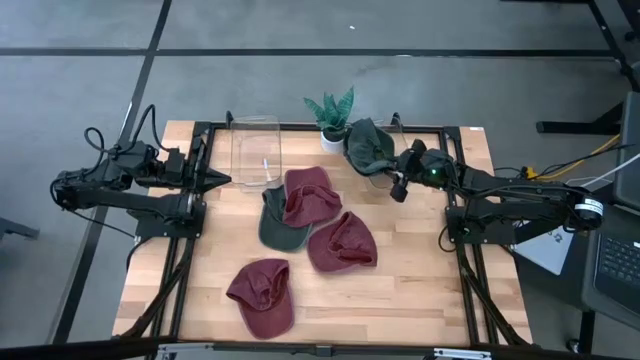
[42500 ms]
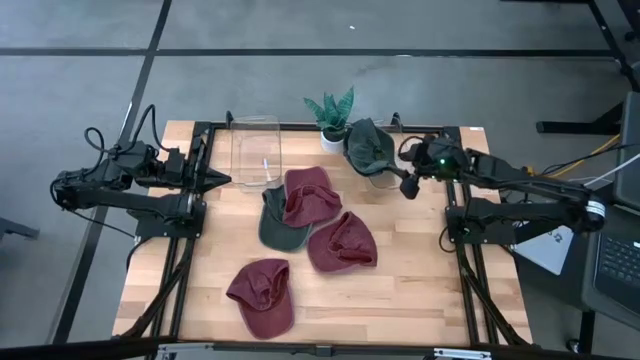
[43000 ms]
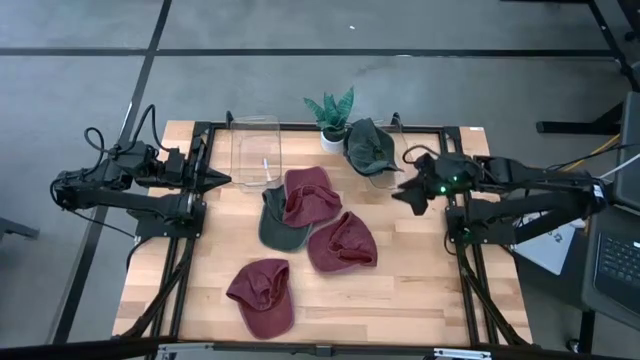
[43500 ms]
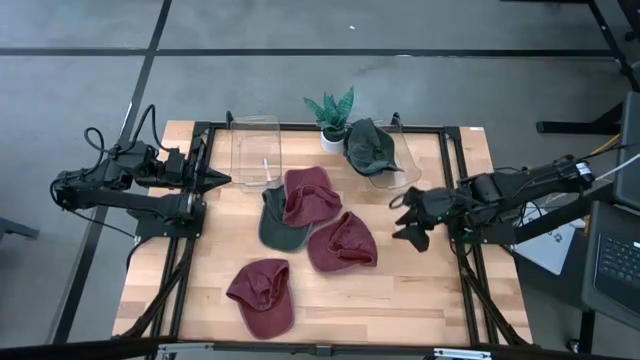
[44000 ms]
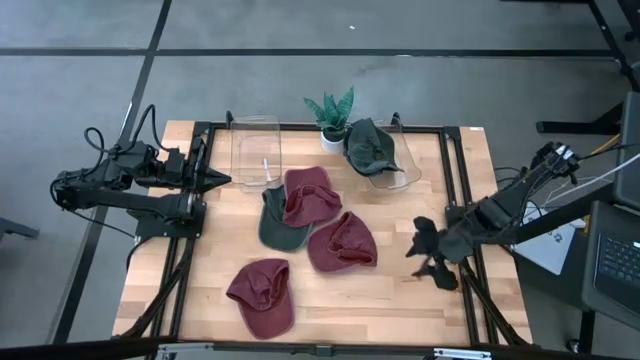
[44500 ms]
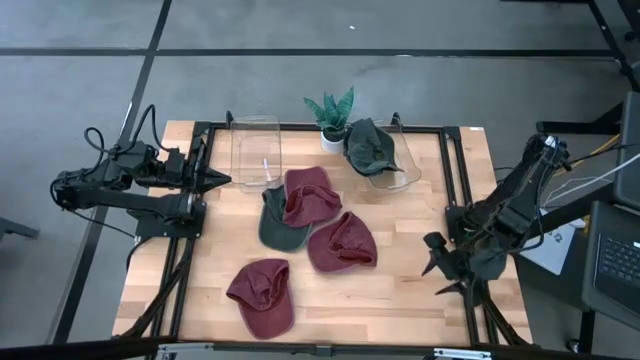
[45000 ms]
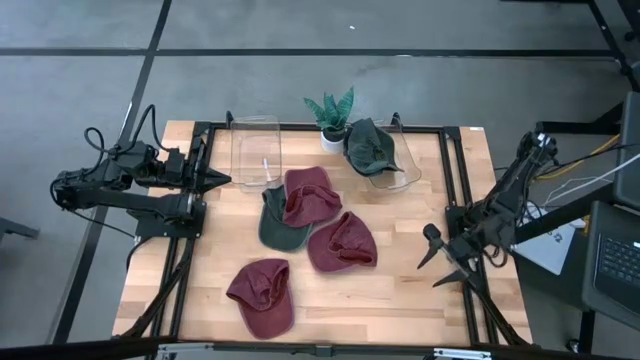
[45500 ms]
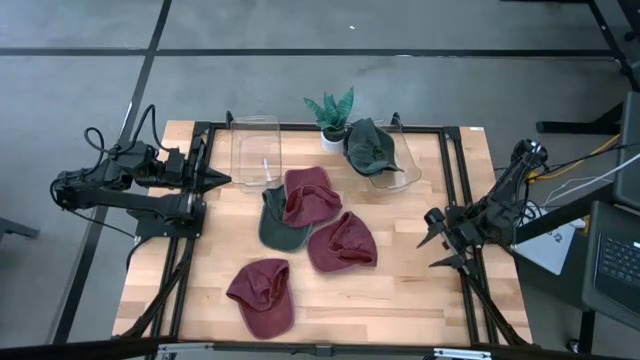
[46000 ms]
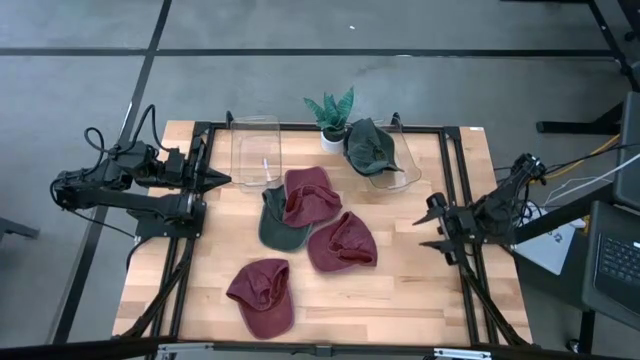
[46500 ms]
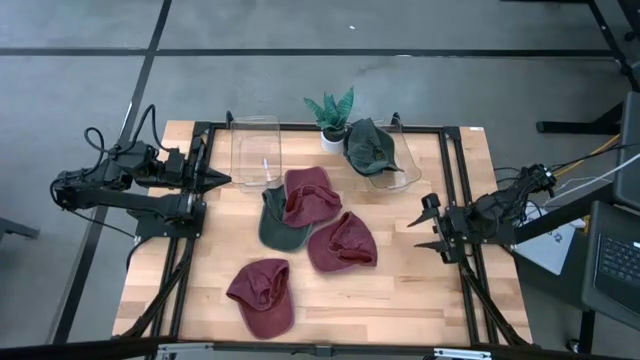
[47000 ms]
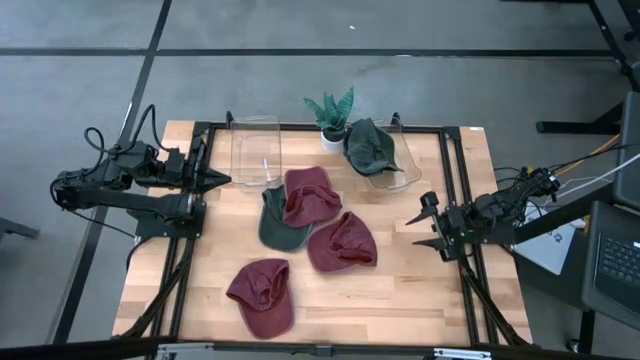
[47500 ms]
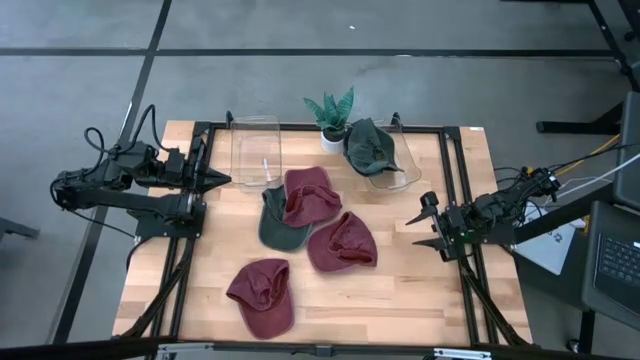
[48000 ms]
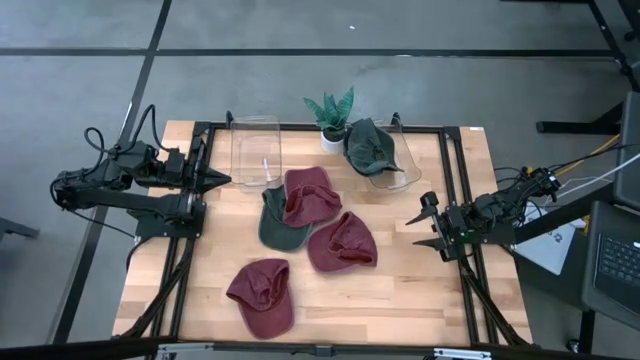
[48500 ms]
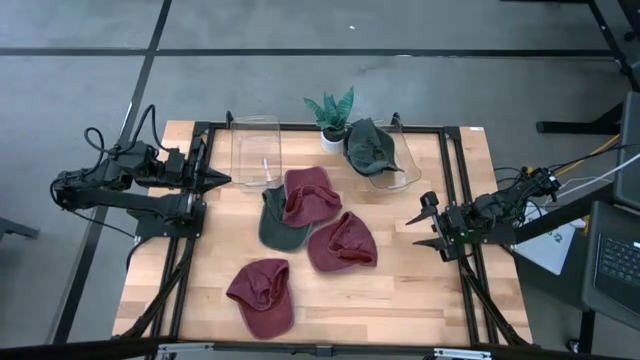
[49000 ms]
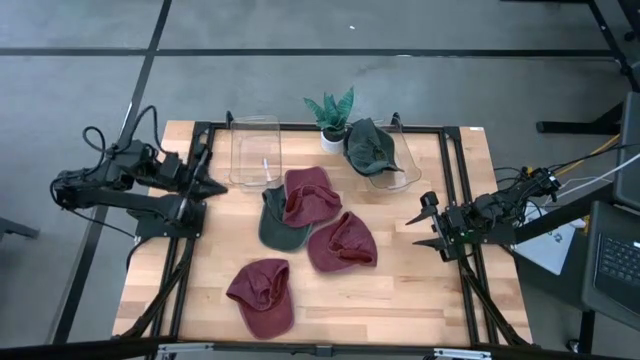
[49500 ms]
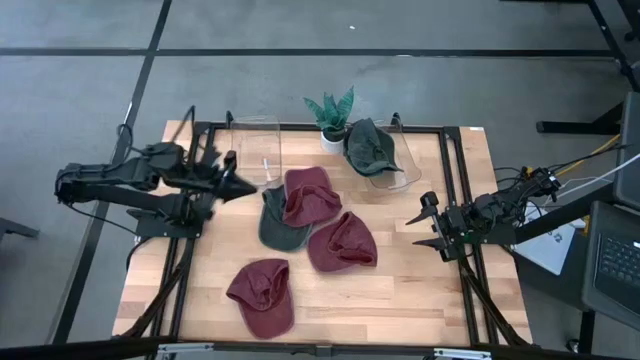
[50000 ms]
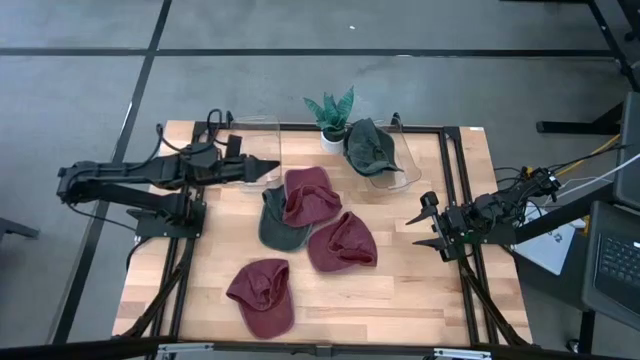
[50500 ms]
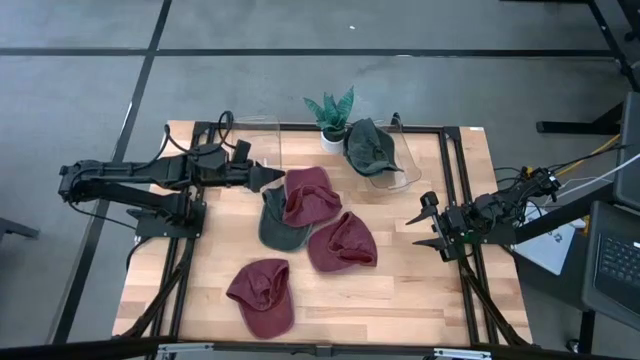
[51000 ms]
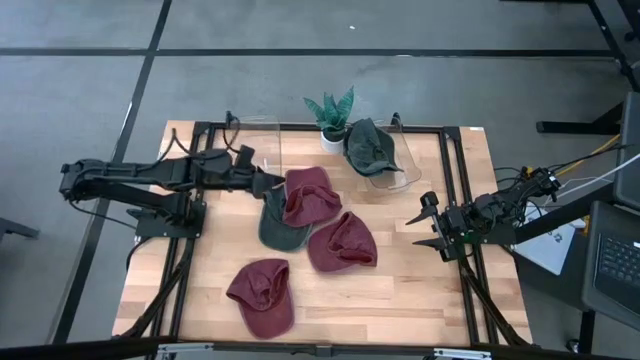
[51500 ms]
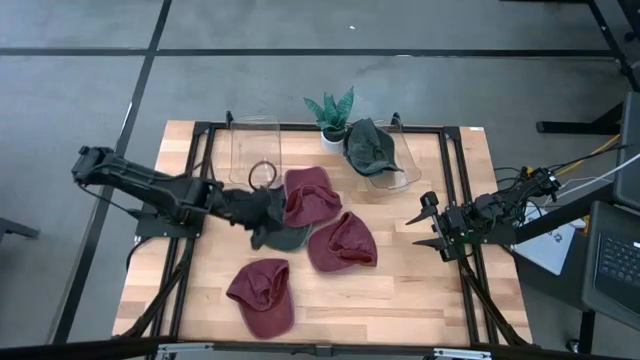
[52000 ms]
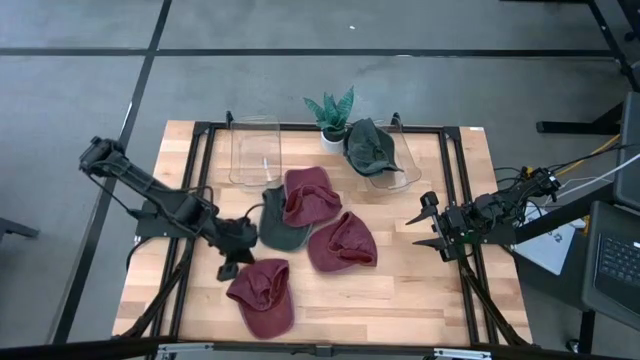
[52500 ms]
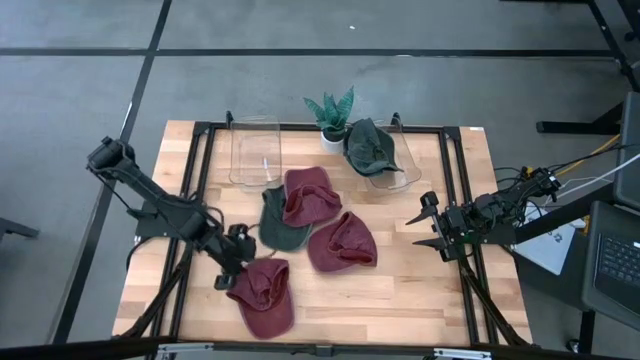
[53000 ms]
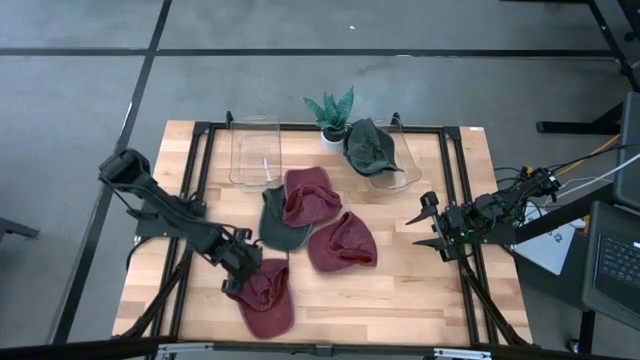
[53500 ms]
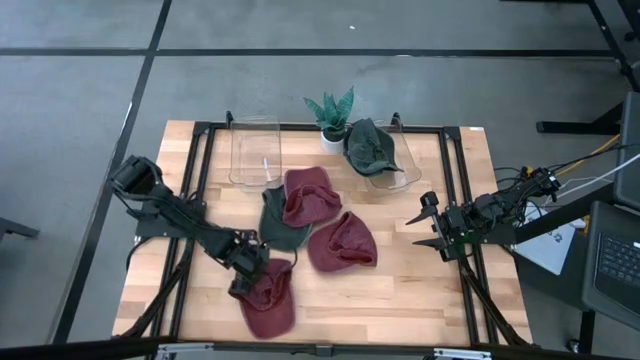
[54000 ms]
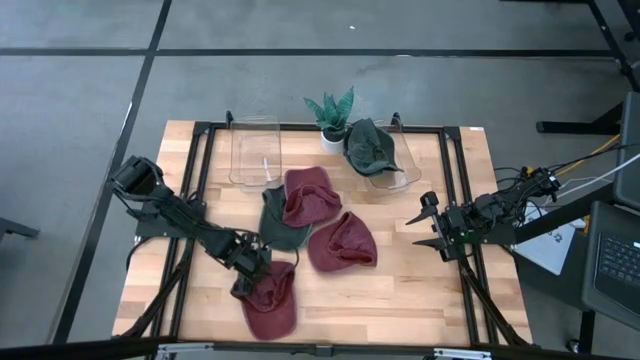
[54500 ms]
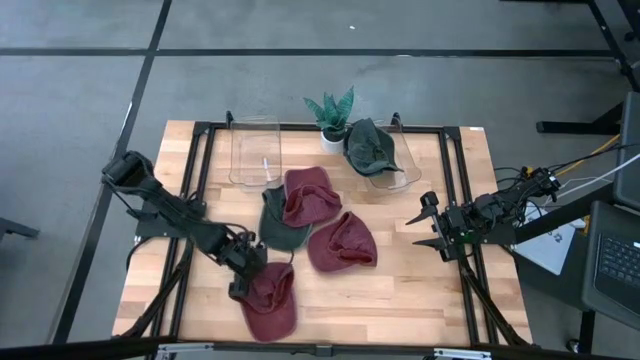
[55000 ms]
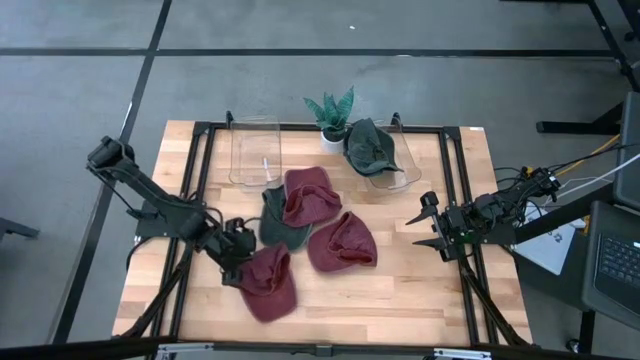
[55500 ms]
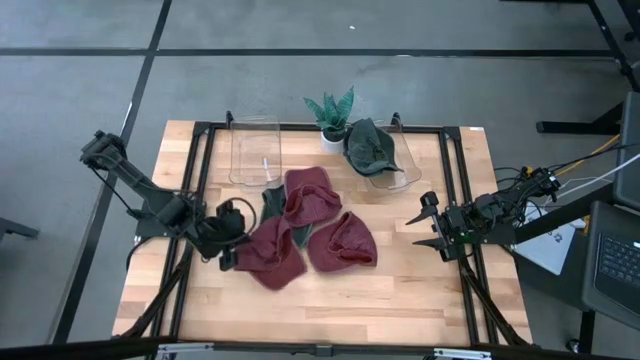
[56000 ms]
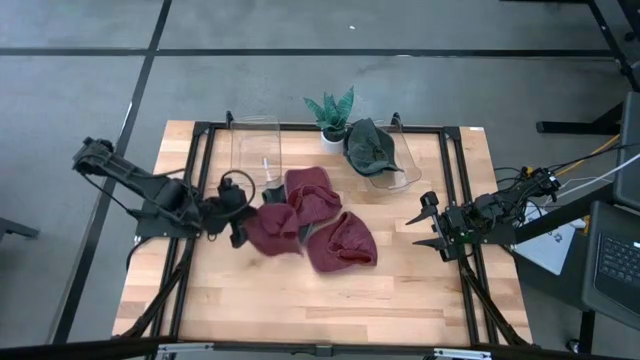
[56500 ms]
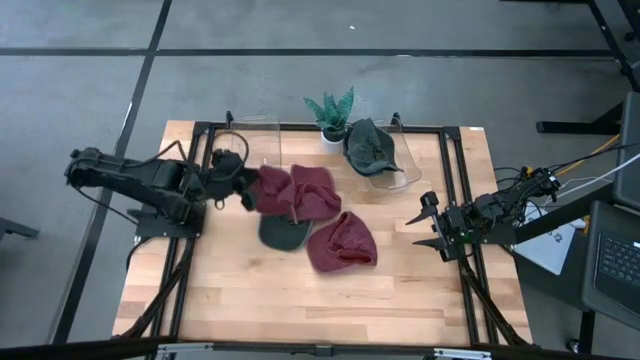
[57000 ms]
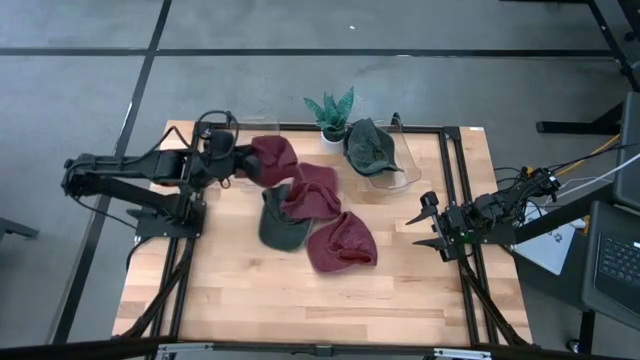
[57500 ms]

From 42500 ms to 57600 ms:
Task: Pick & Place hat
Put the bottom red cap into the left bin
